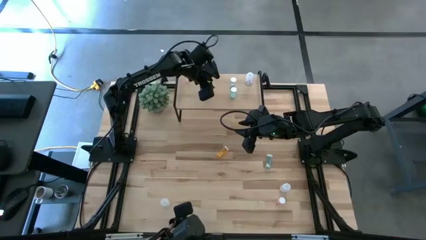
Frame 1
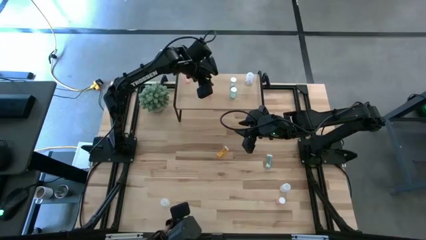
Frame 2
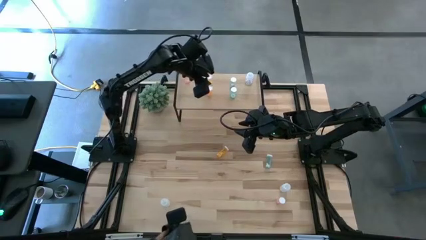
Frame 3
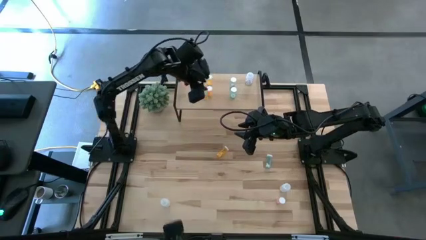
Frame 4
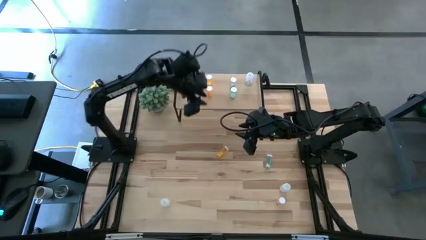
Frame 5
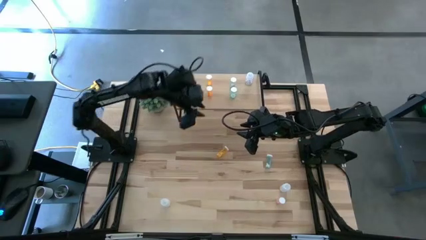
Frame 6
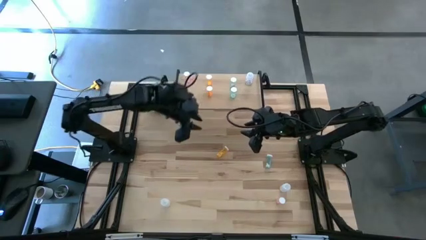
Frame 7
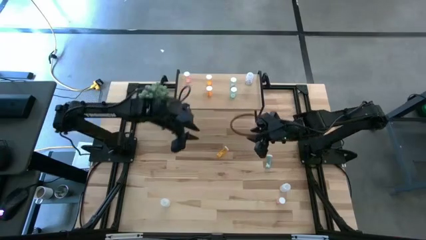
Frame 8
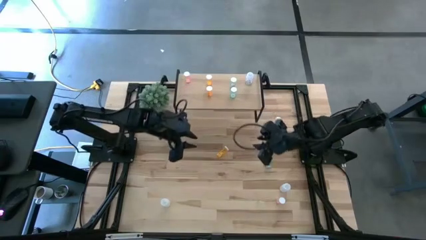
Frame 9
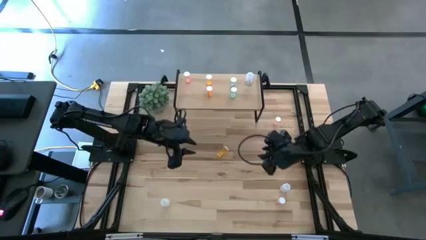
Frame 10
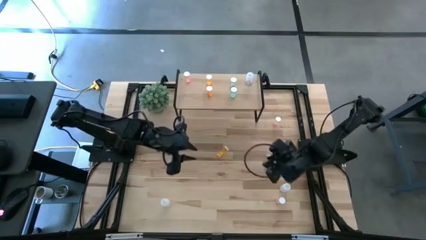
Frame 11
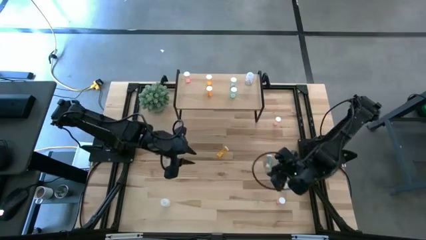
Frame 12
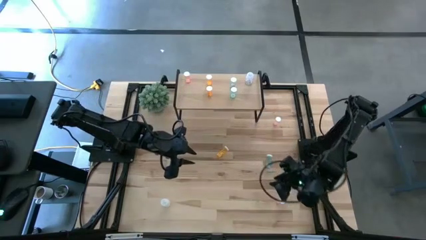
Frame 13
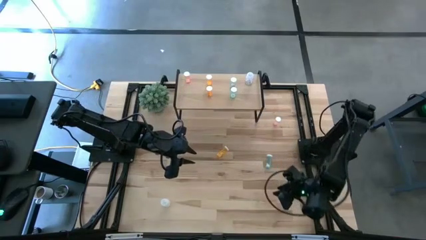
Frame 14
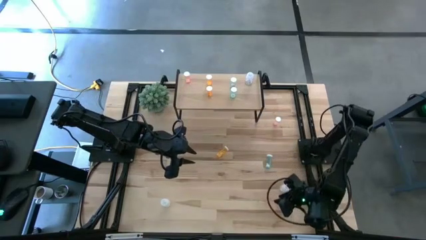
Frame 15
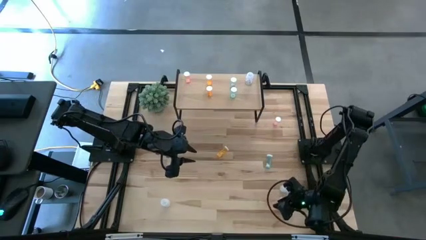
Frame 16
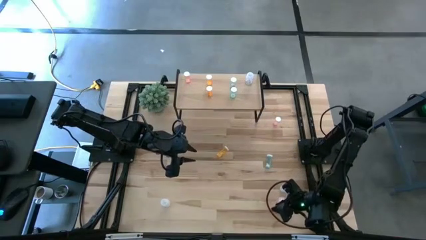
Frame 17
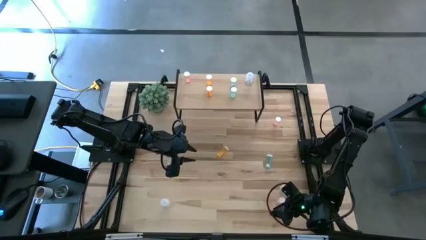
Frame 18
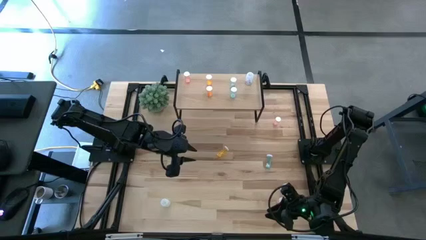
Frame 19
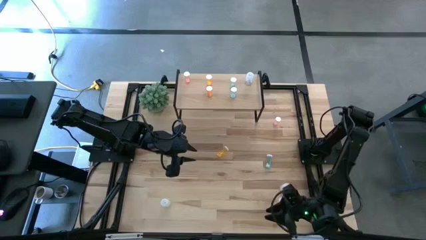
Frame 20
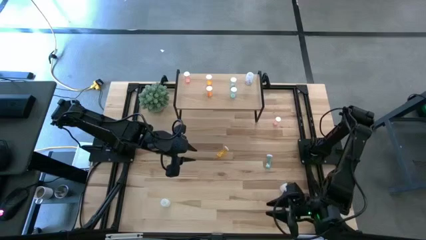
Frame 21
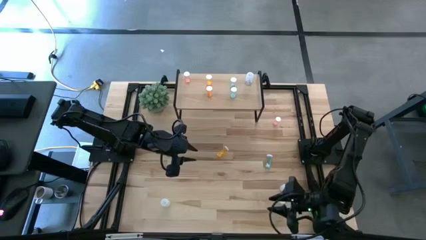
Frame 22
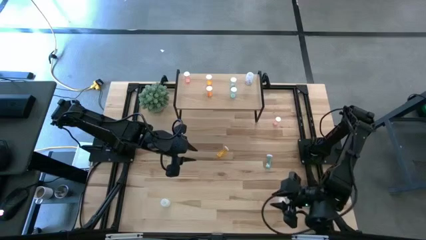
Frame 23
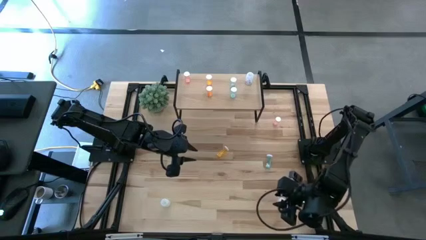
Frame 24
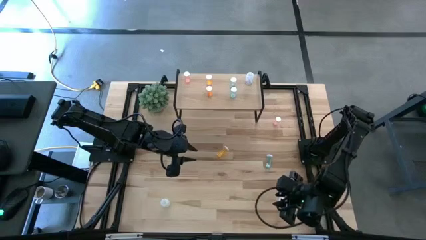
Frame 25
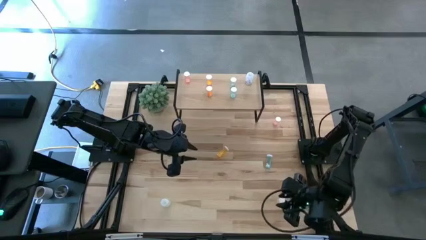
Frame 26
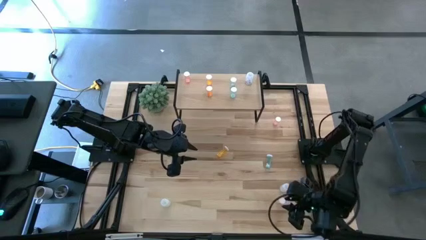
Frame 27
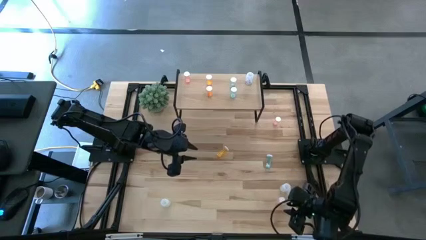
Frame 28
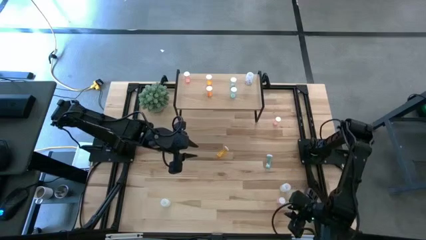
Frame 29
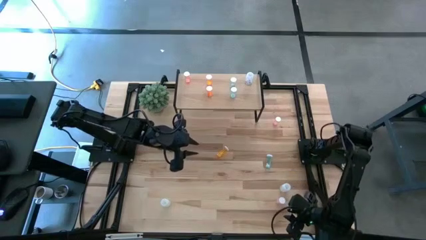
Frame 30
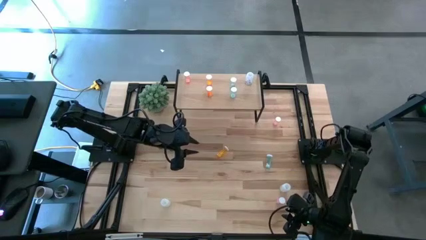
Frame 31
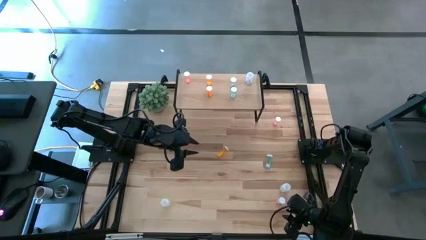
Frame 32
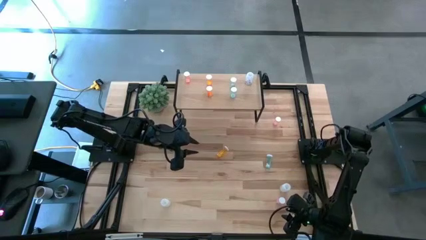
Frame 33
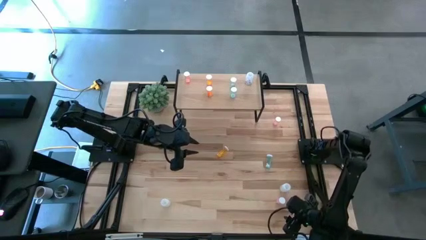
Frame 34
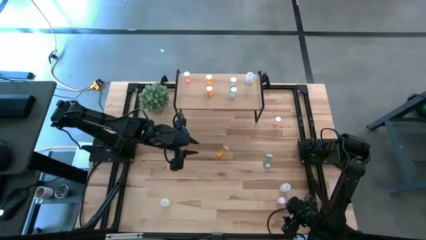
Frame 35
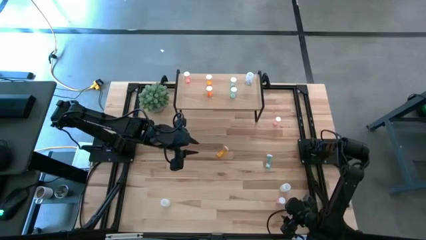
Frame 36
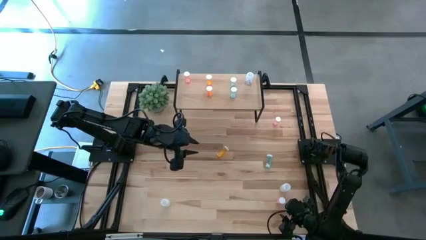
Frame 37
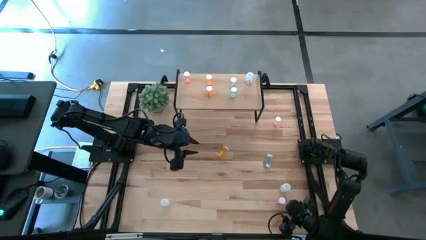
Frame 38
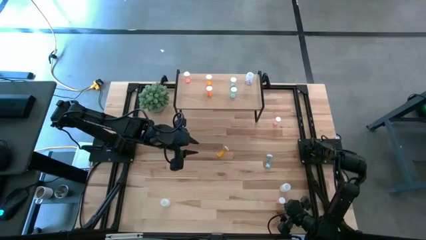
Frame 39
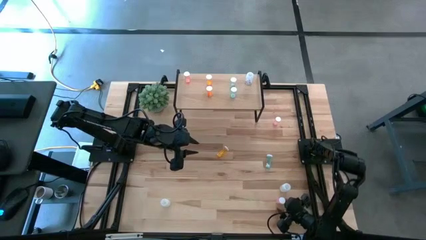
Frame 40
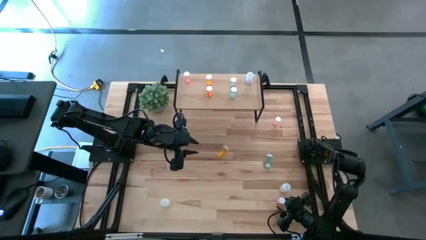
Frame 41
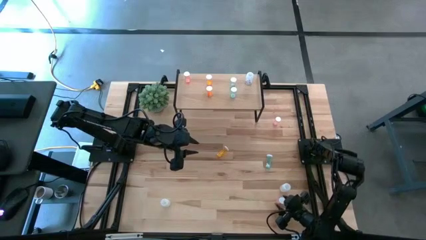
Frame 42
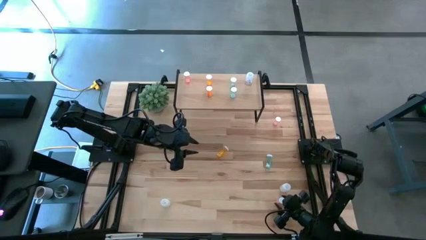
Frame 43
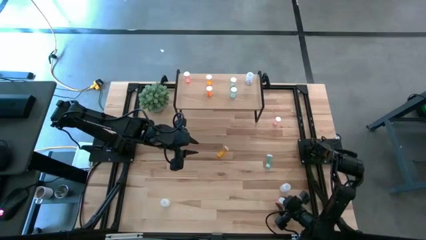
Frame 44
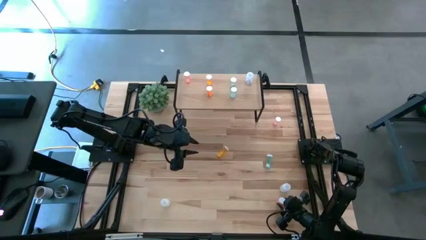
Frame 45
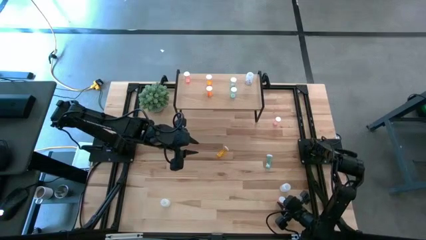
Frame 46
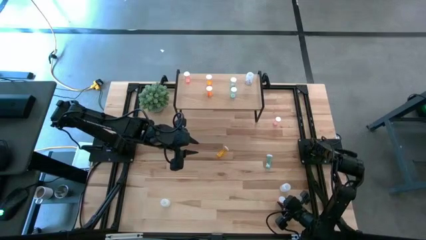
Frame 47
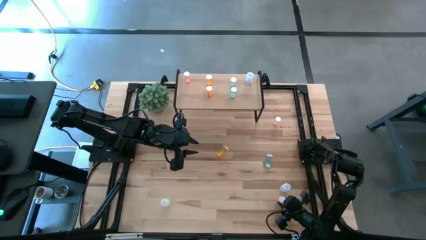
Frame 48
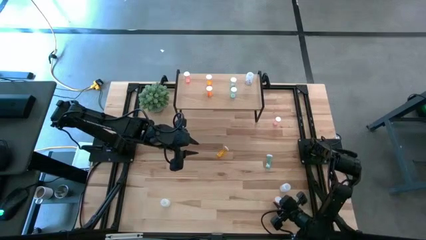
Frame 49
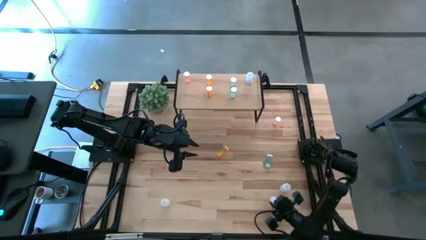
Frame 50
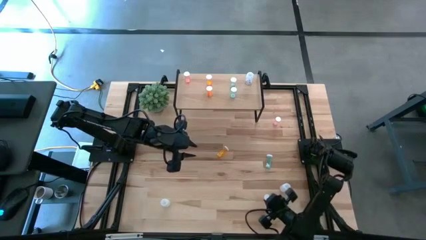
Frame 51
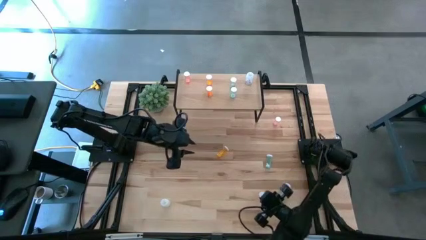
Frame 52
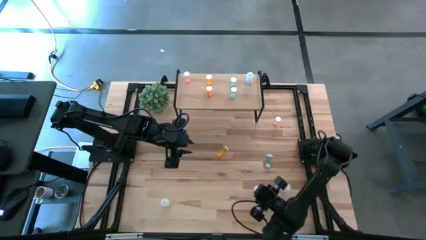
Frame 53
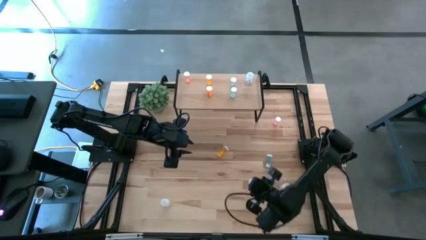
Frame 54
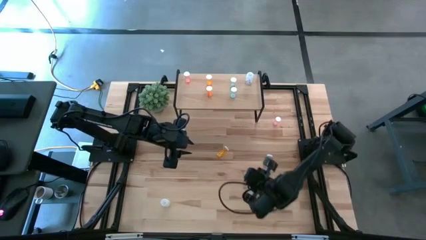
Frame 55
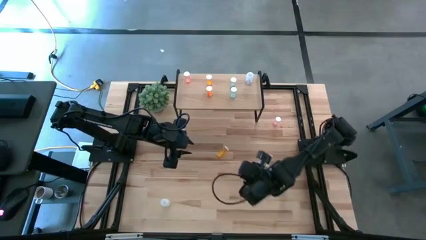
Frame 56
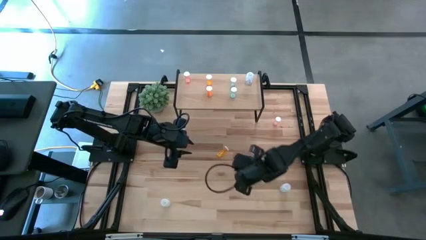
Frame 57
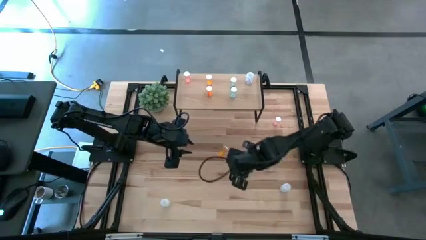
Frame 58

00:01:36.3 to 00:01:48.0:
Task: Pick and place medicine bottles onto shelf by color
Put the bottom pink pill bottle on the shelf aligned with the other pink pill bottle

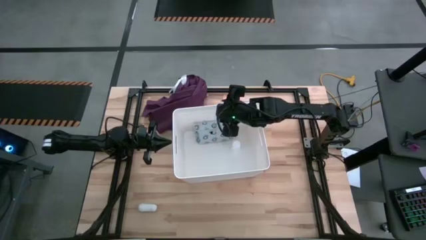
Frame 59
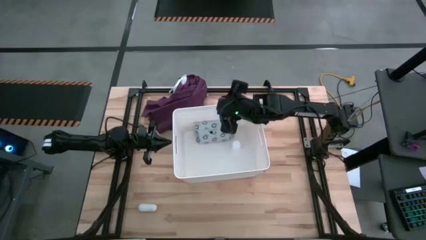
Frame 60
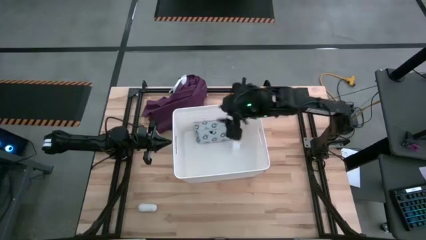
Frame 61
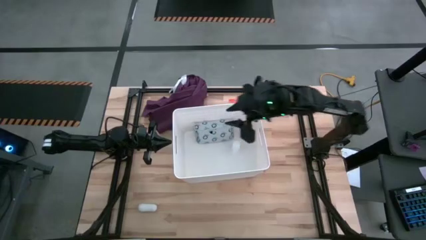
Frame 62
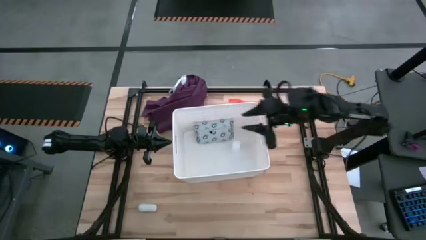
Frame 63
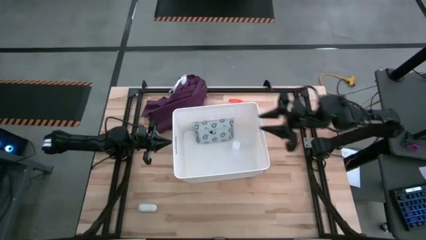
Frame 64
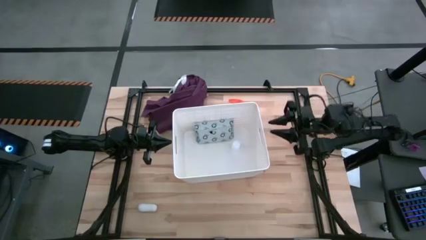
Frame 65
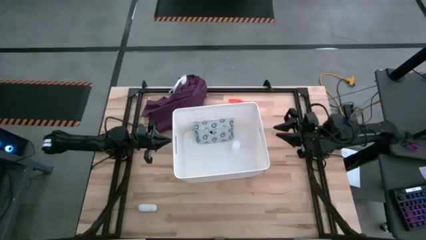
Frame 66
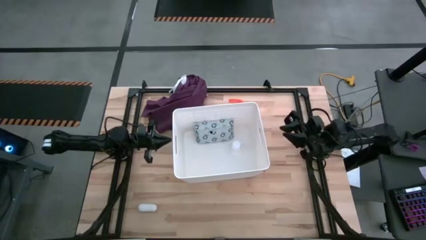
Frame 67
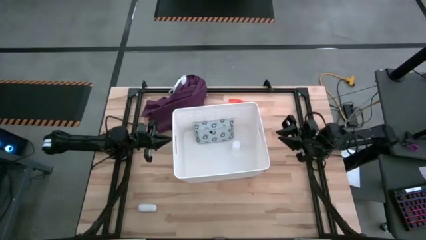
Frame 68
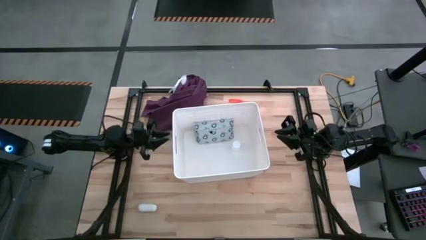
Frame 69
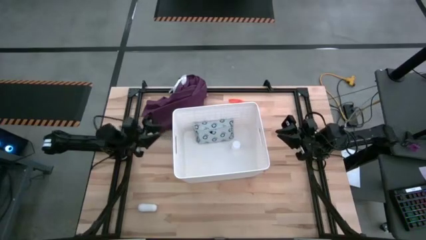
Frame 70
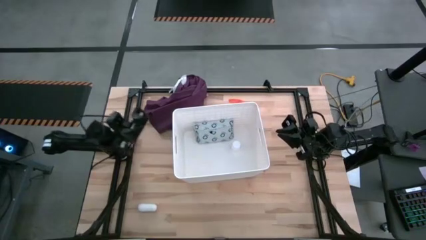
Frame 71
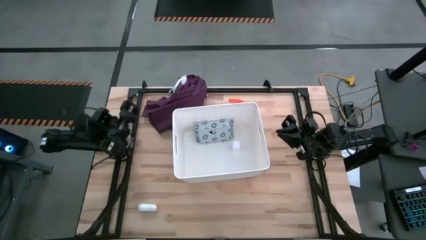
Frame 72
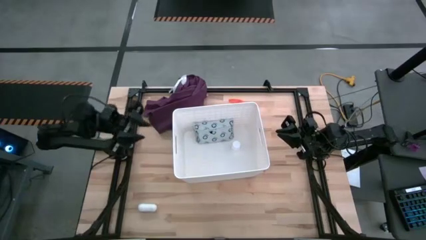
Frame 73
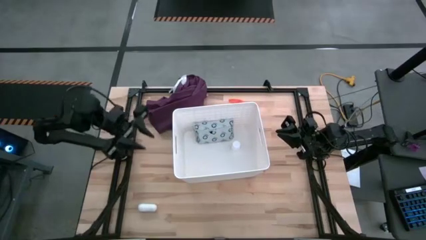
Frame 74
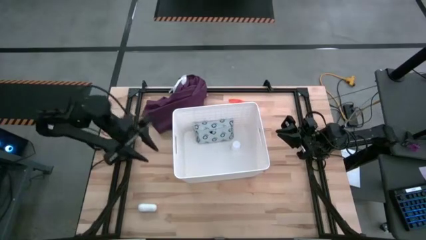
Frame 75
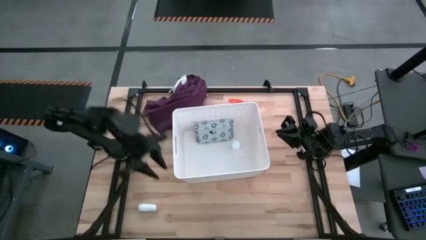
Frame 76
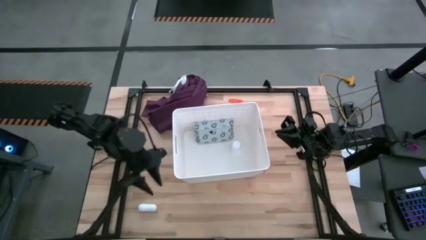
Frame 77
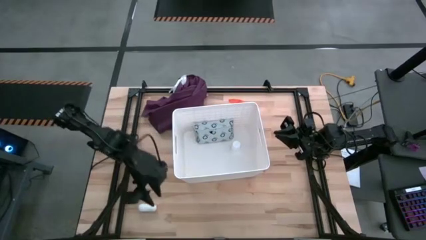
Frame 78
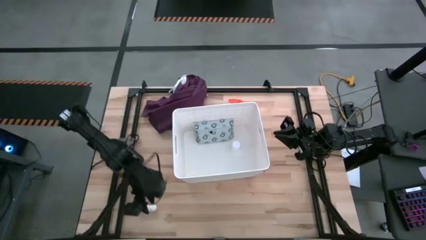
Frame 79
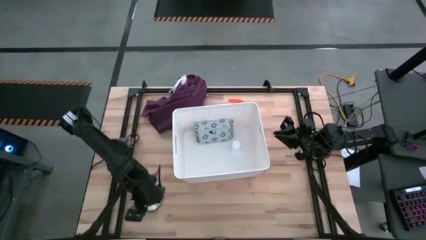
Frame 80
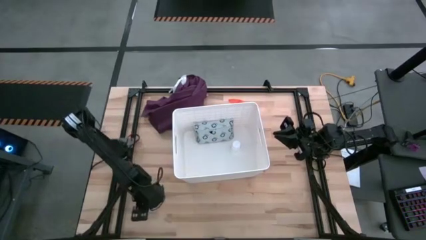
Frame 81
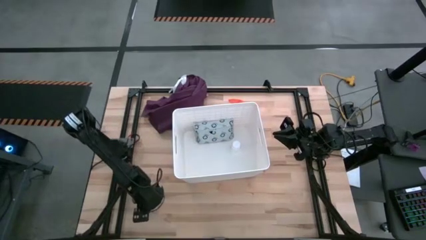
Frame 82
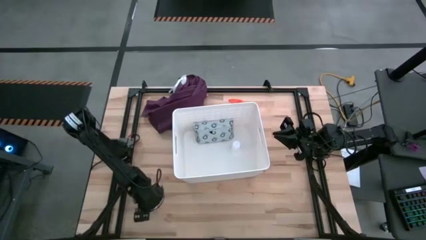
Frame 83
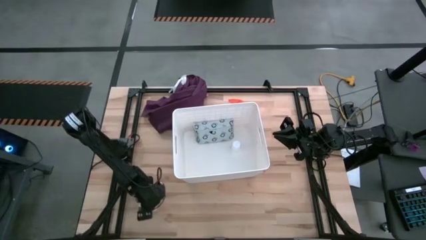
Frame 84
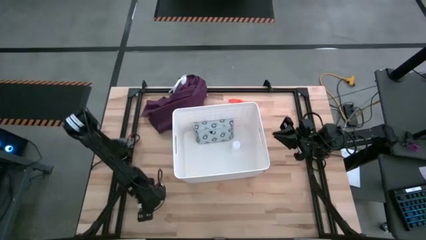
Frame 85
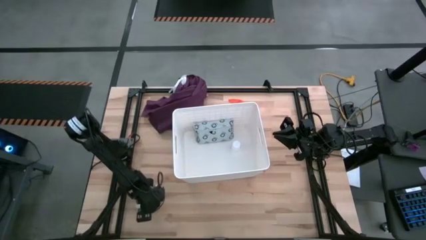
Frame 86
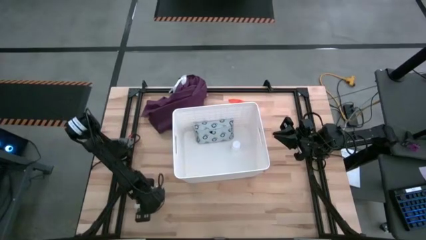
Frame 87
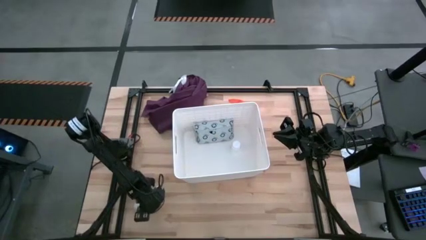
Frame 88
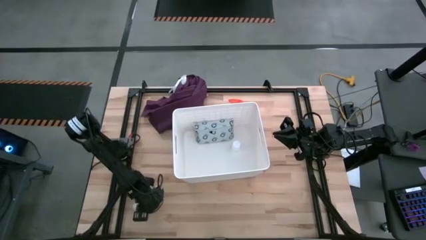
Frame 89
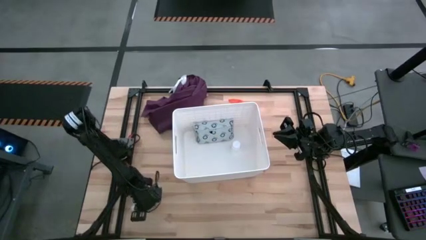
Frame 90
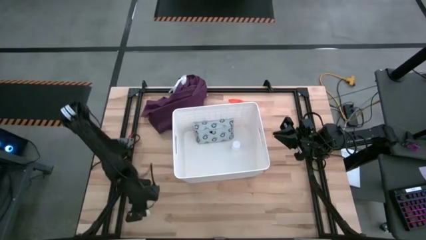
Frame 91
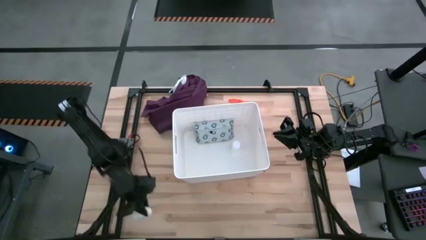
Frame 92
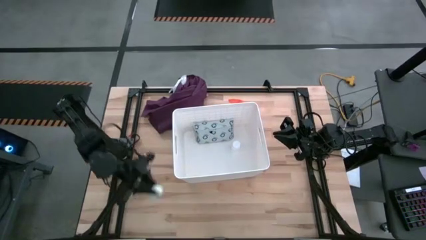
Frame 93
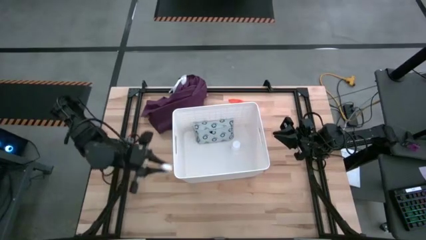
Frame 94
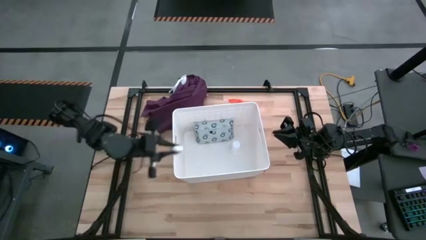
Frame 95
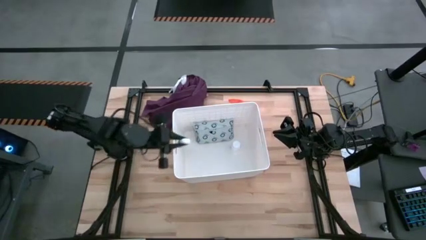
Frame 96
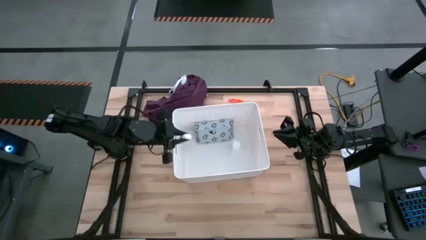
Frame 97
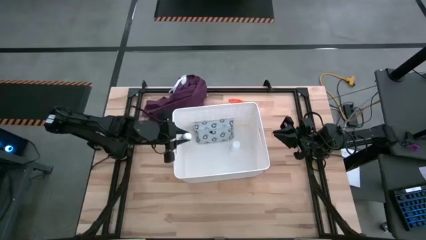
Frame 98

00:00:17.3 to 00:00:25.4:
Task: Pick & place medical supplies in basket/bin
Put the white rolled gauze into the white bin
